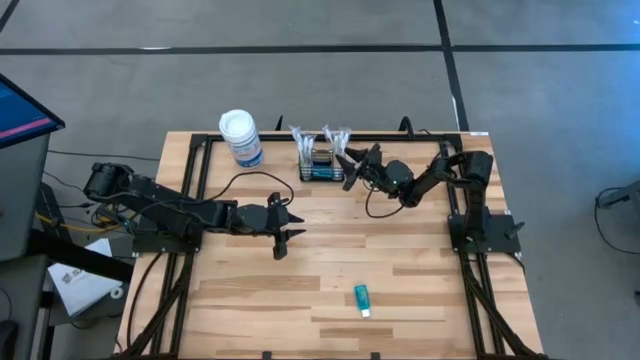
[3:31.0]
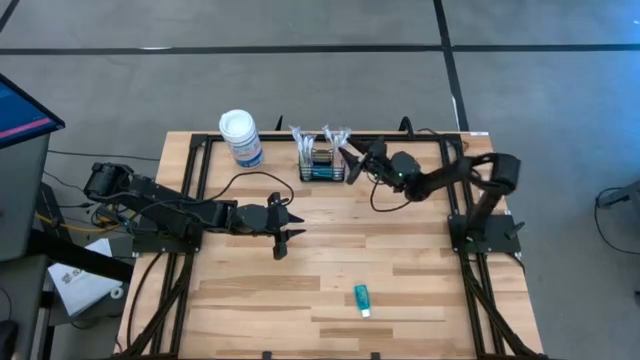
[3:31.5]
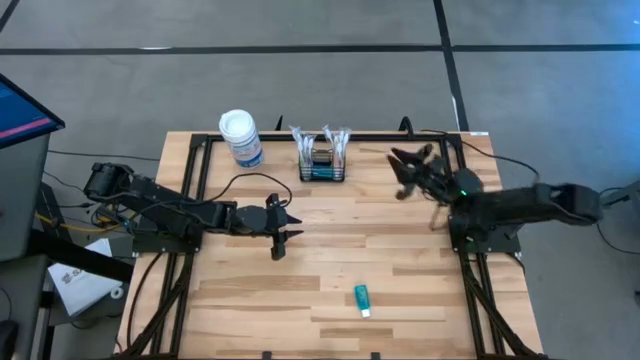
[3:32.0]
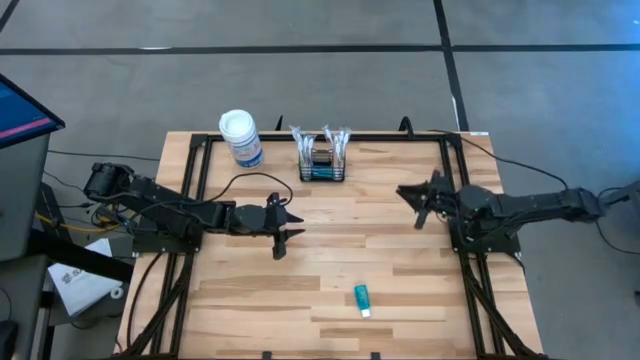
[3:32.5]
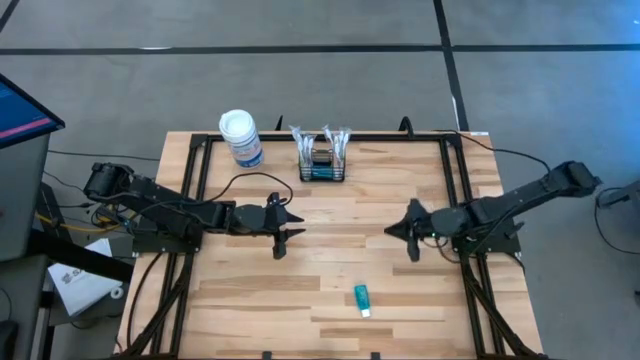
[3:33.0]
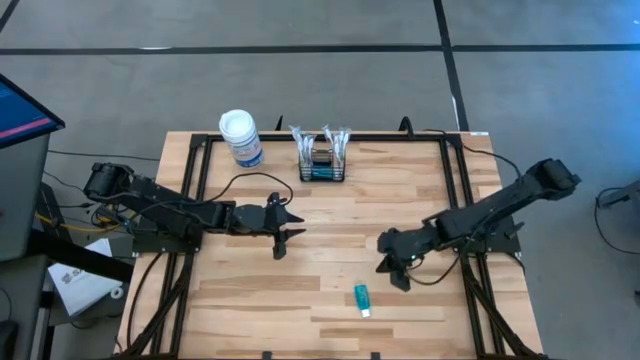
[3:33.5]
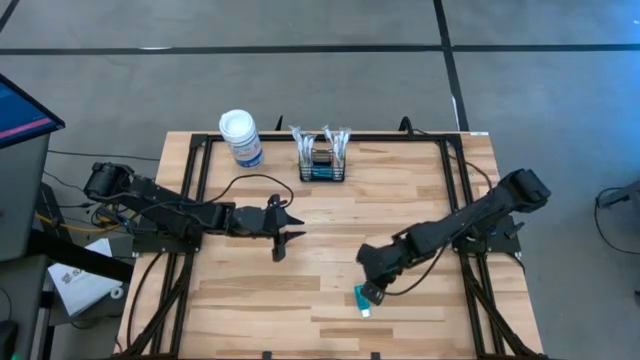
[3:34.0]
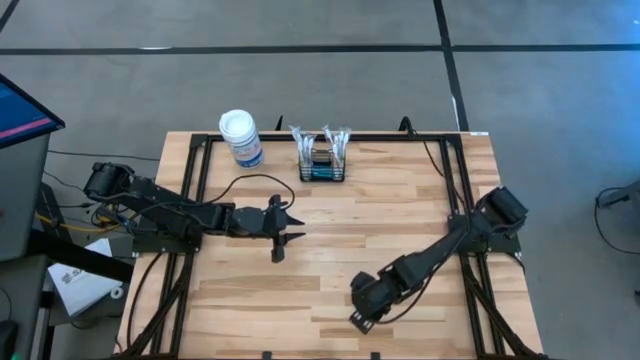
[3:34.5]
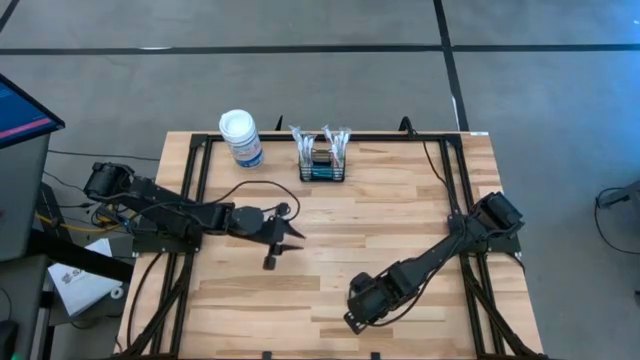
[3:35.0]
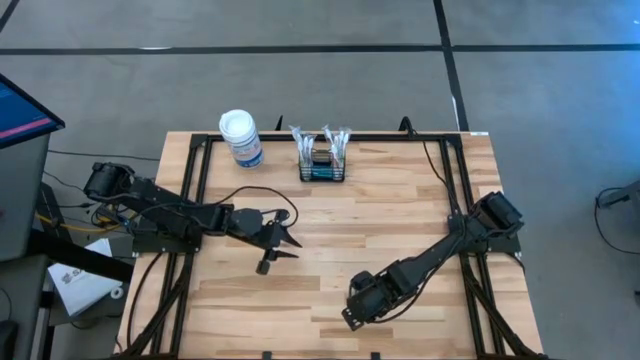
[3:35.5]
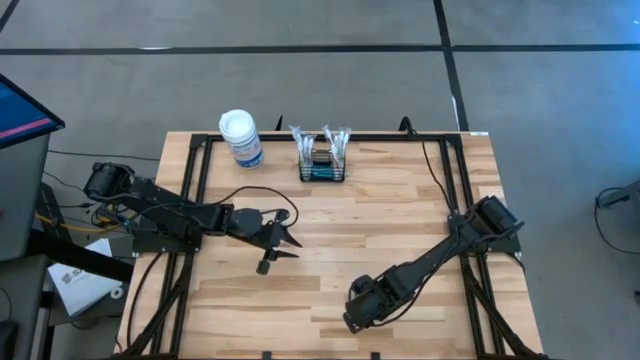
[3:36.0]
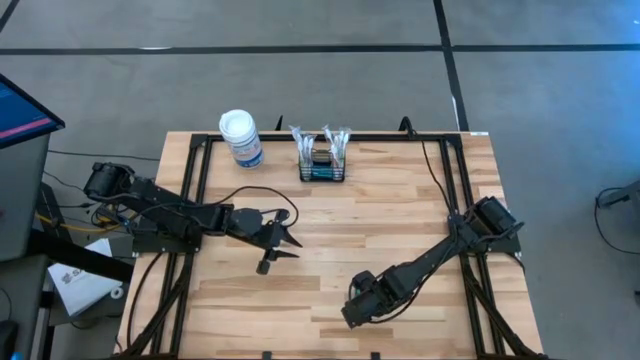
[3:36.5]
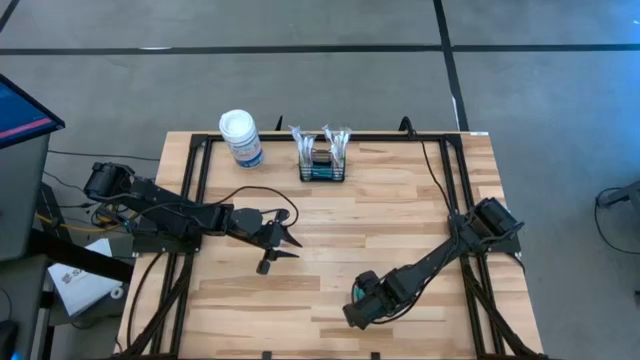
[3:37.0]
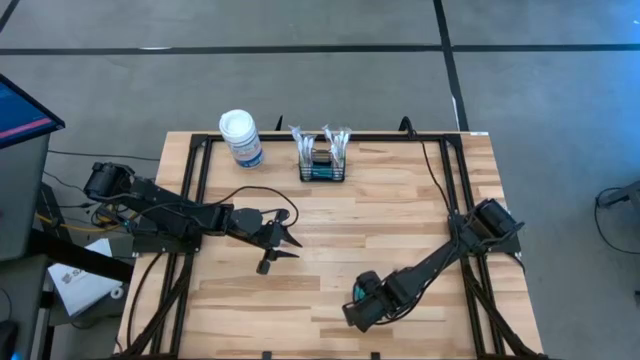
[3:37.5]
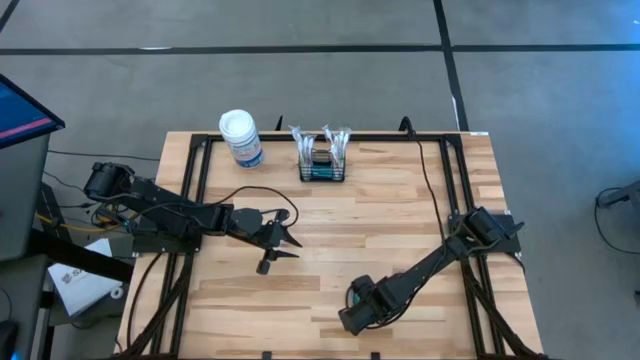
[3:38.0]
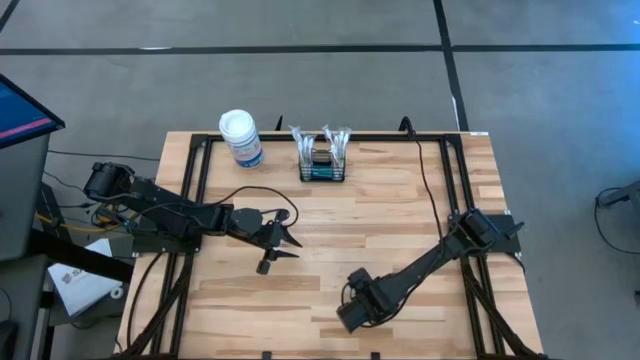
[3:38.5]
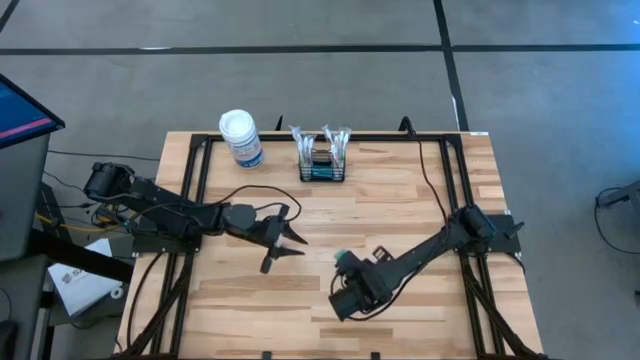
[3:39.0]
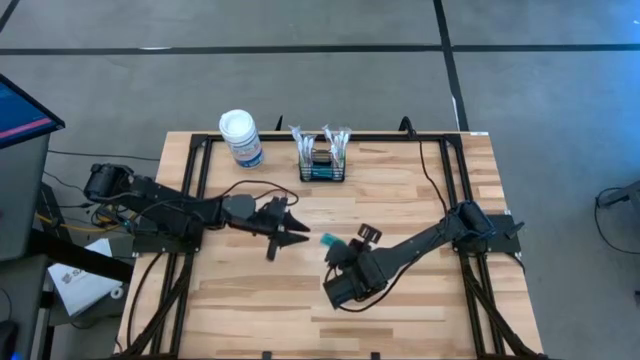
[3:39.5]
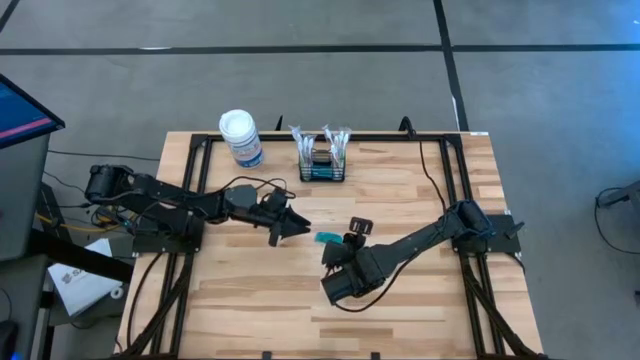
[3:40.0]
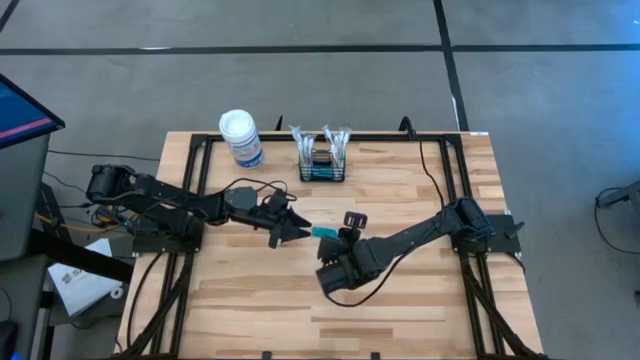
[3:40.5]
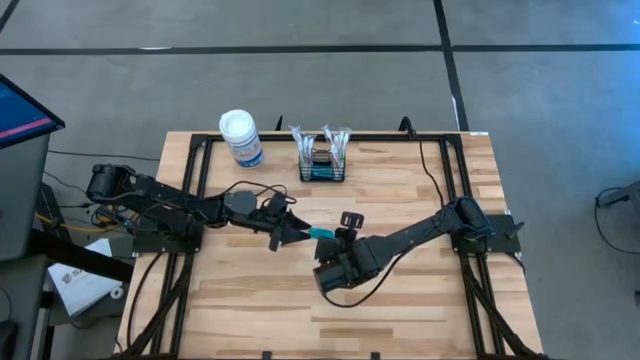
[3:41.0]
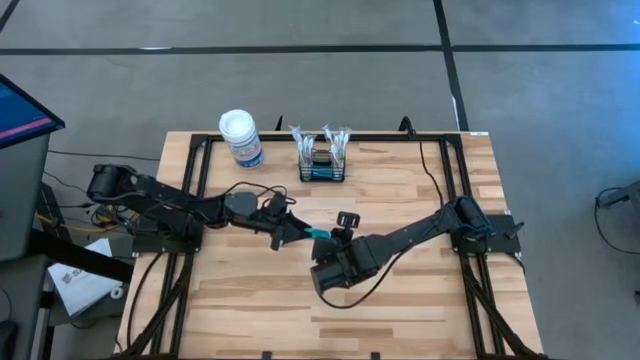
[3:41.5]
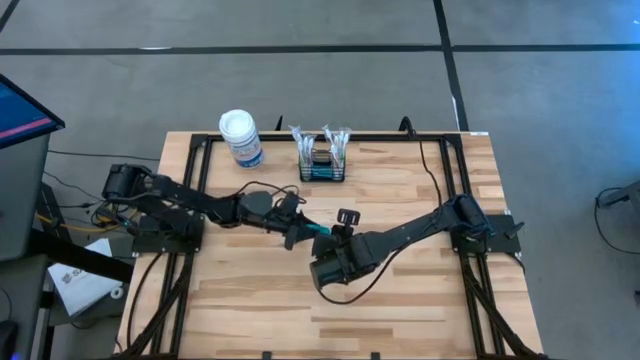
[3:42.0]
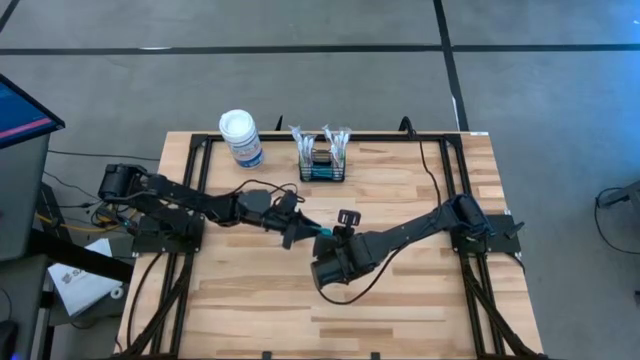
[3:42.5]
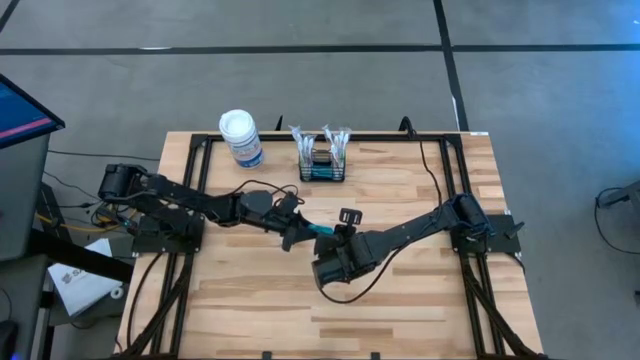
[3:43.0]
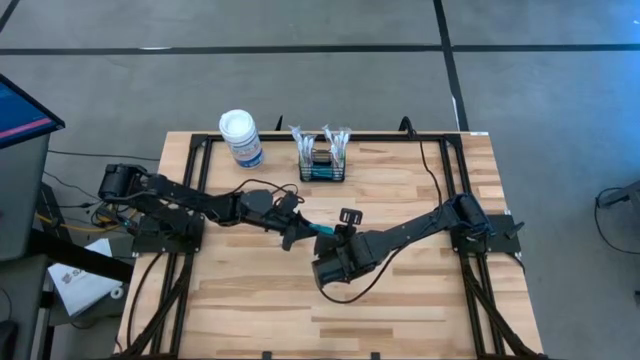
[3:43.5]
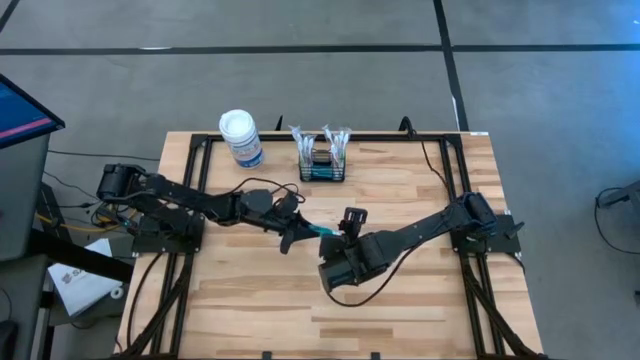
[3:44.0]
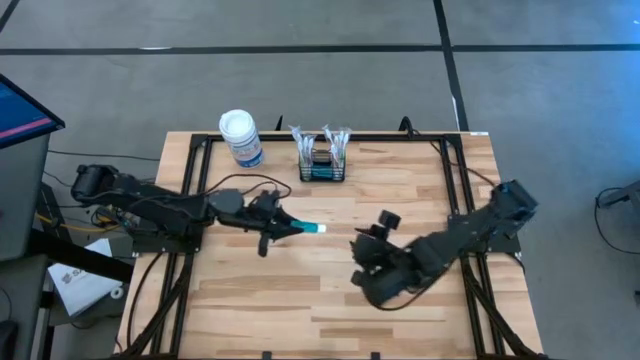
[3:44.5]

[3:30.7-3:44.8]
Task: Pick & Place toothbrushing station
Put the blue mouthwash into the black wire organizer

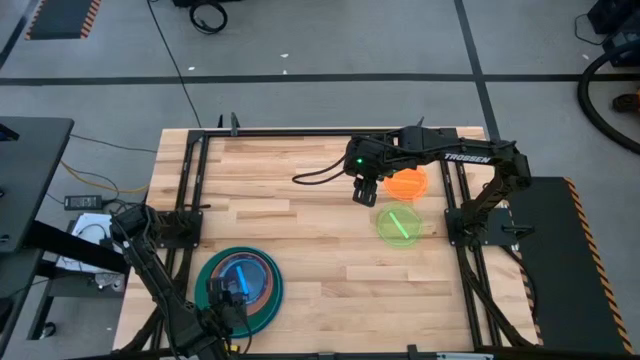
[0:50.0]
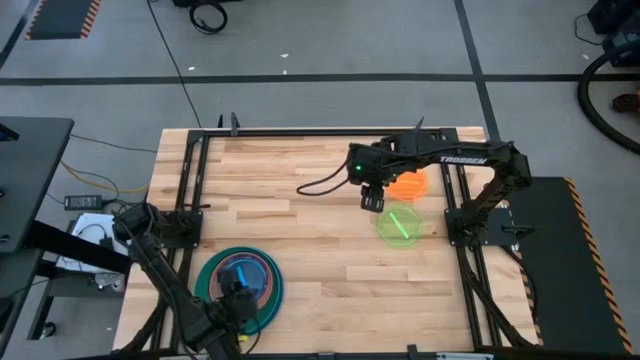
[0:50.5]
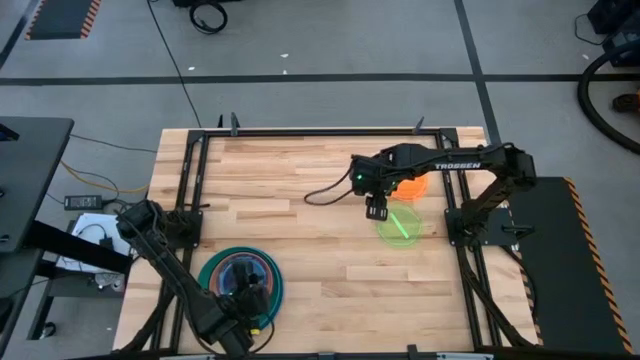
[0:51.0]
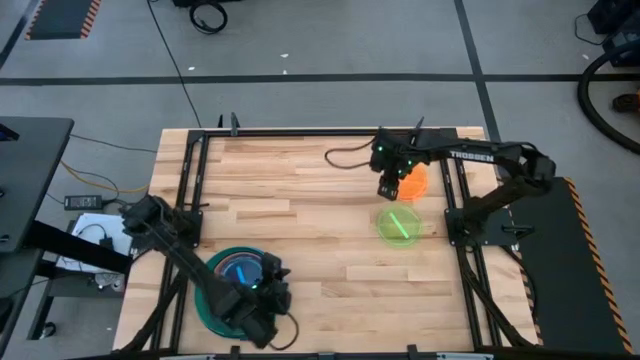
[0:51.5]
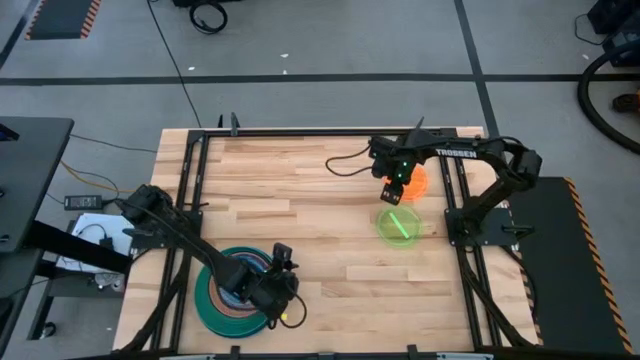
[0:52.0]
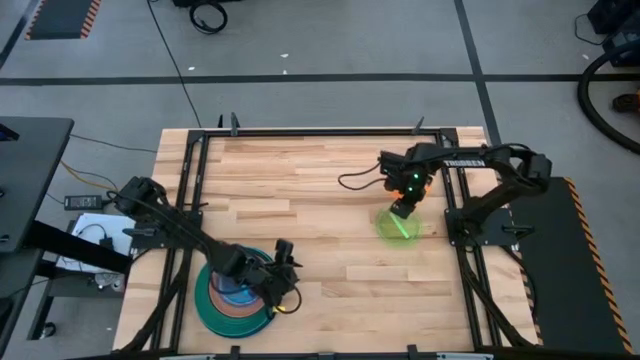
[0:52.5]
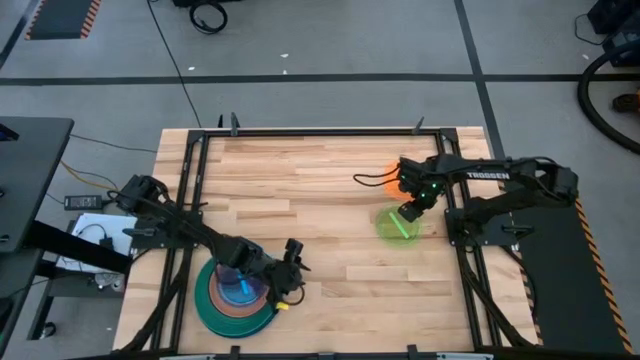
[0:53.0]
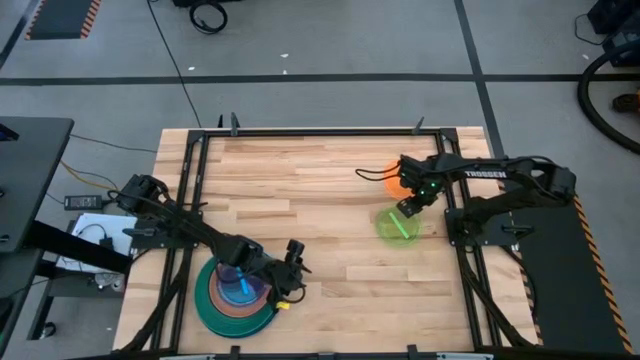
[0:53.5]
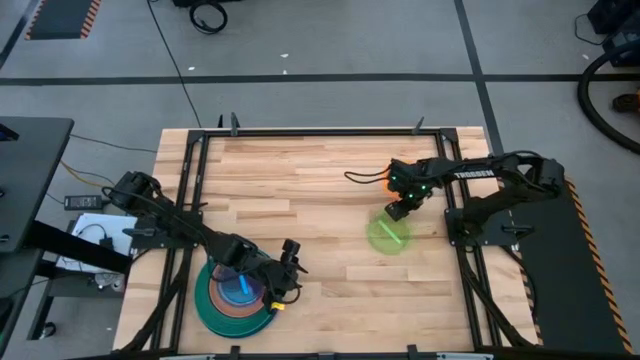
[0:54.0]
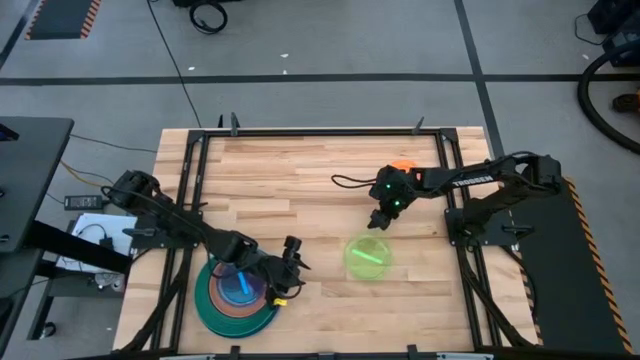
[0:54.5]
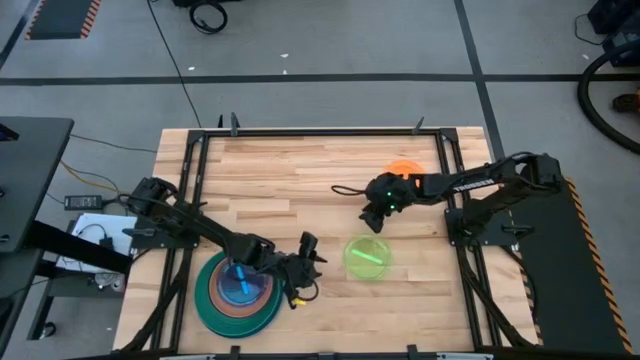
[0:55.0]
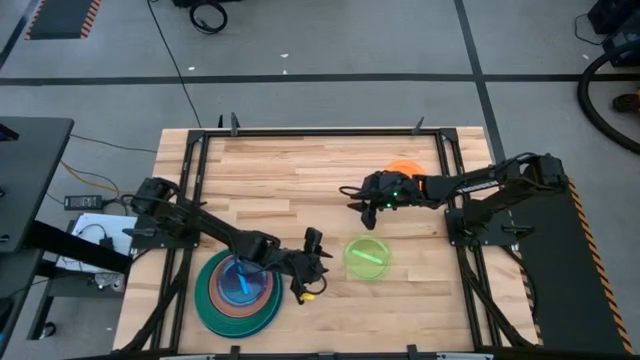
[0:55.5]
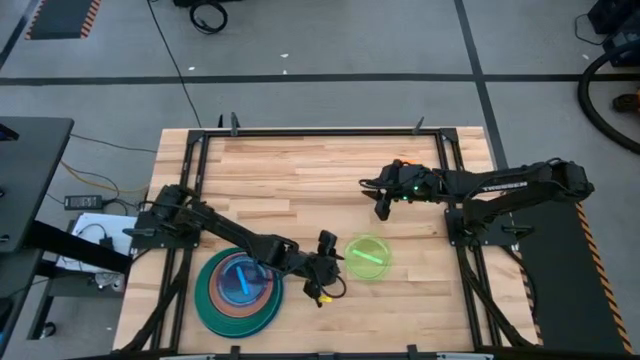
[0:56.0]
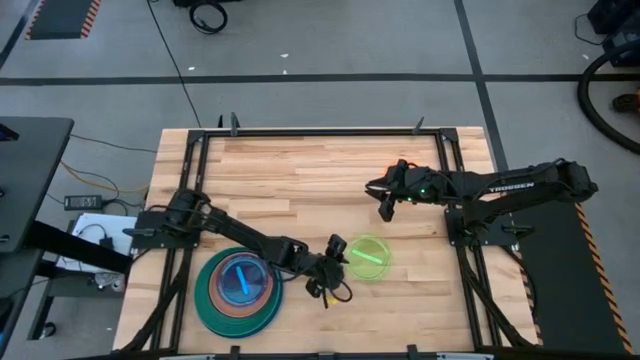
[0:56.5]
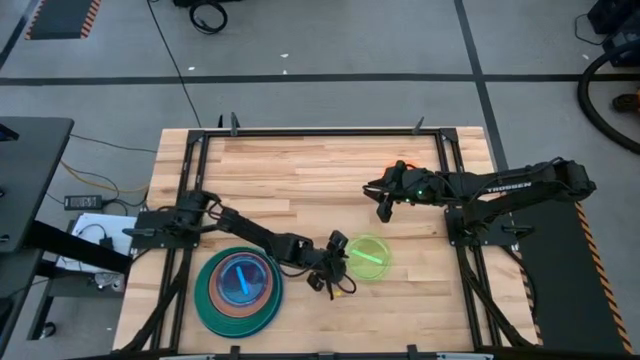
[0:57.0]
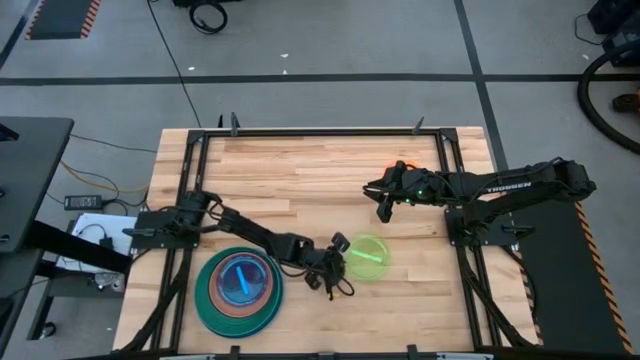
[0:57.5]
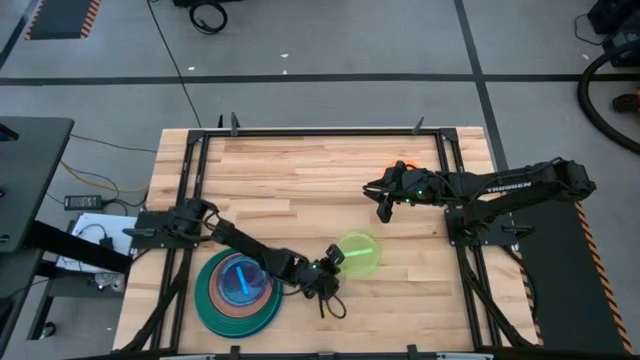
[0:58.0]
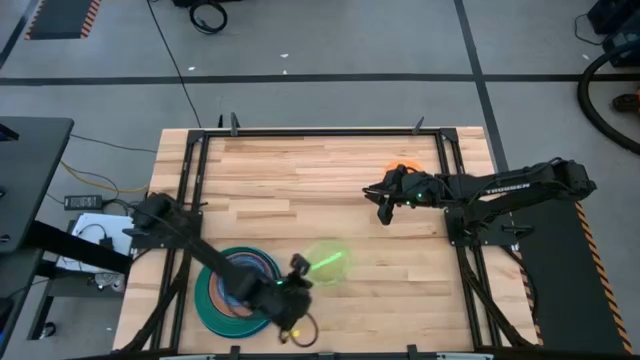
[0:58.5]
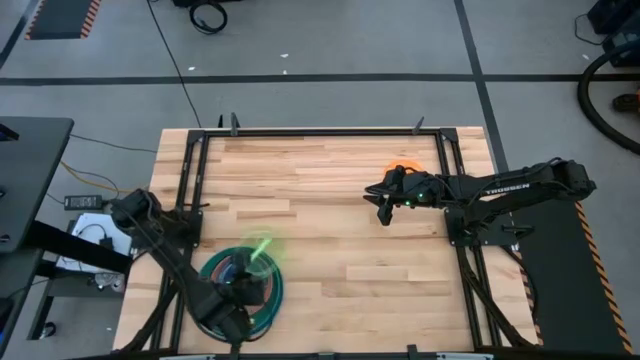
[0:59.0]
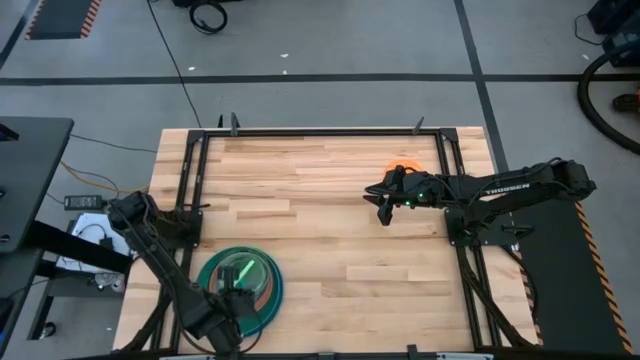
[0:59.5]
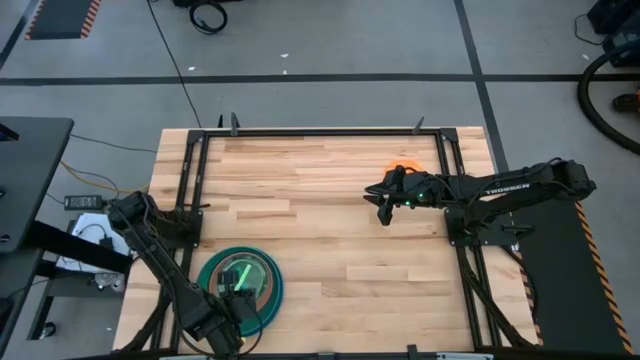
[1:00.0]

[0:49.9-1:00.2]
Task: Stack plastic plates
Stack the light green plate on top of the light blue plate
